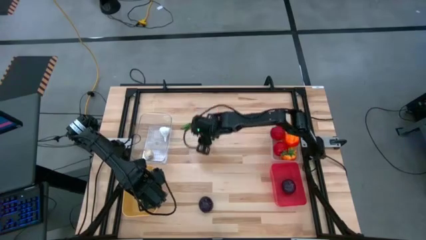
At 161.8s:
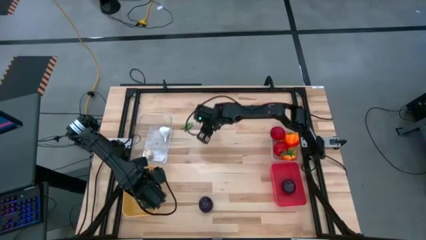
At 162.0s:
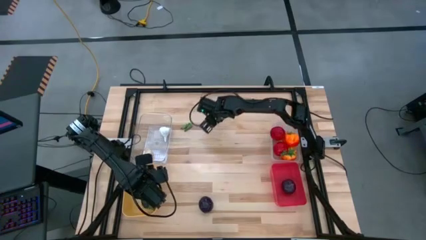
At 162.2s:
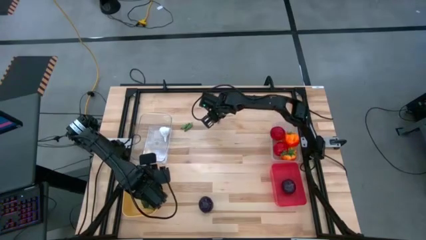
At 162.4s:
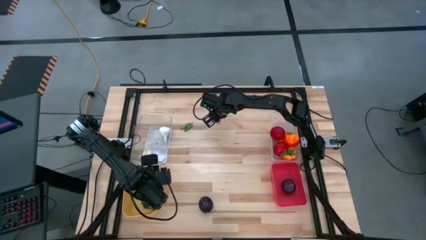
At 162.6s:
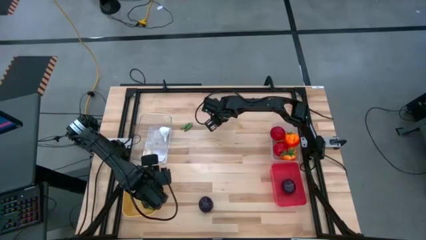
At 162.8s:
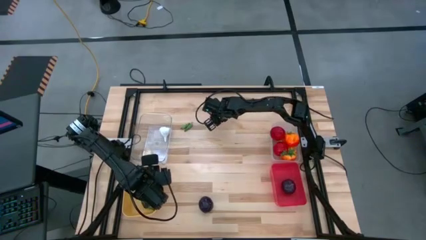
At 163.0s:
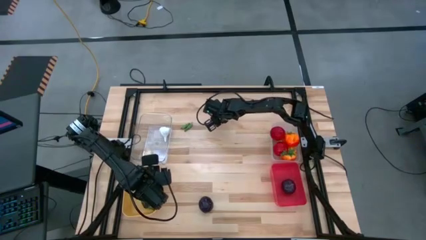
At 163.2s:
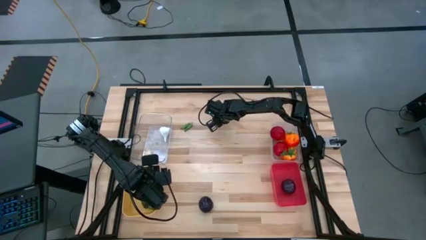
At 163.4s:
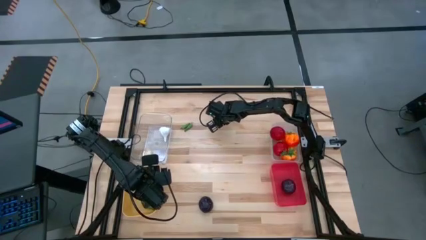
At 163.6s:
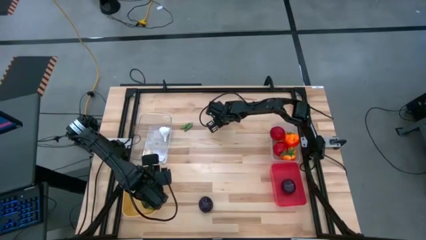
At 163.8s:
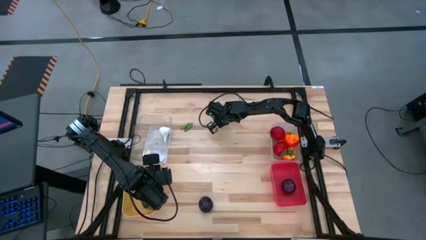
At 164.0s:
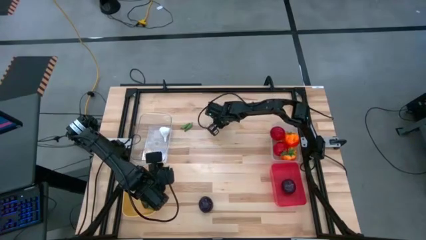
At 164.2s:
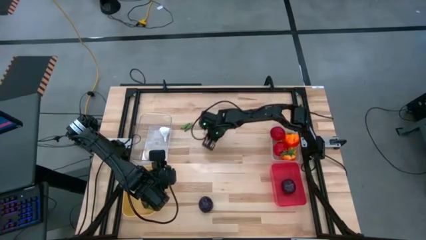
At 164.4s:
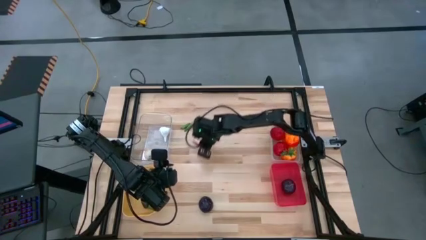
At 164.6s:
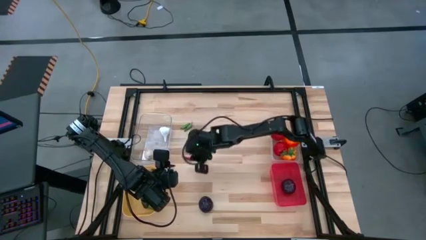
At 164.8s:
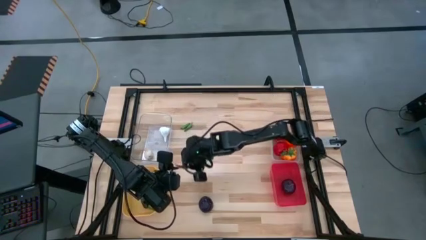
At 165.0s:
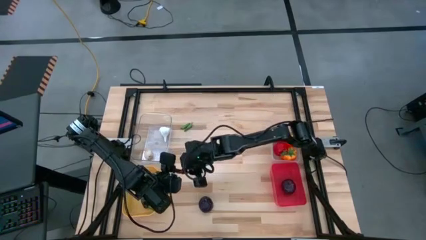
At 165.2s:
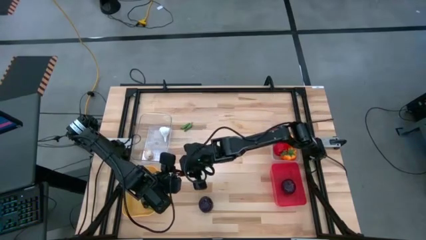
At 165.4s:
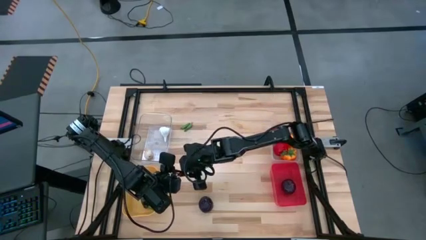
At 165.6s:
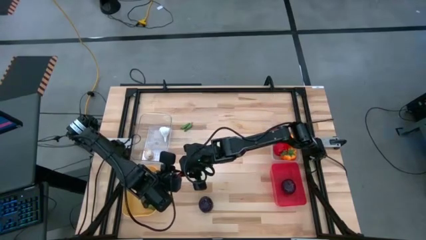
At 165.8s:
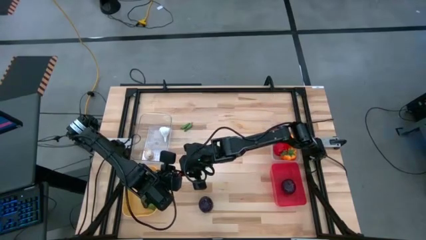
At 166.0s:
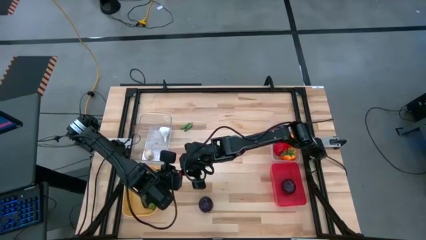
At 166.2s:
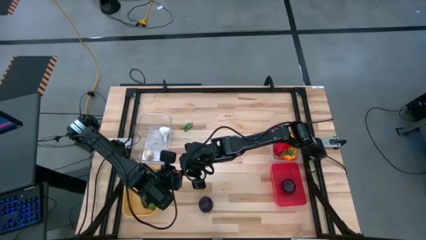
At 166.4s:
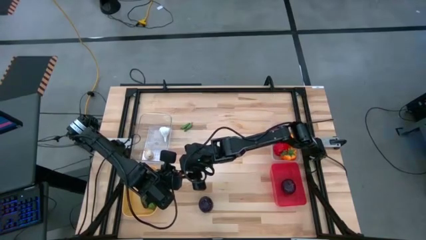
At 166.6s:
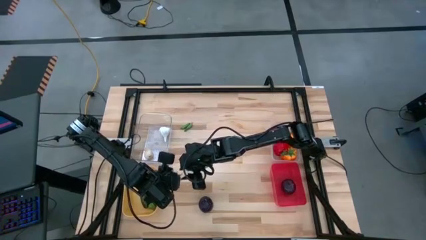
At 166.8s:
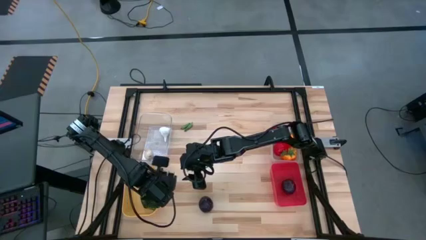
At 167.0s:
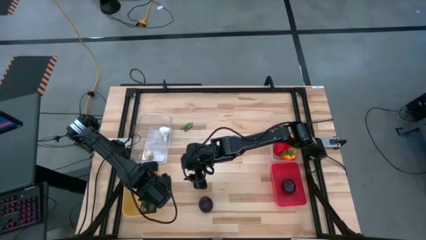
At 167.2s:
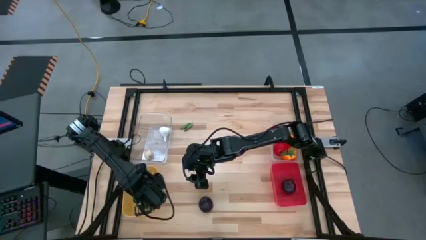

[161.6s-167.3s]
Task: Sort produce into baskets
Put the red chili pepper into the yellow bin

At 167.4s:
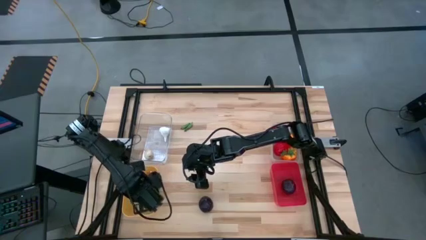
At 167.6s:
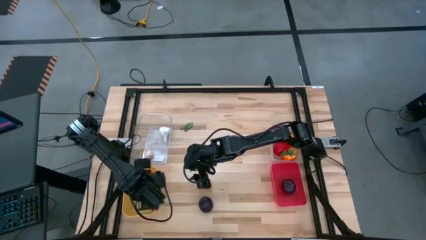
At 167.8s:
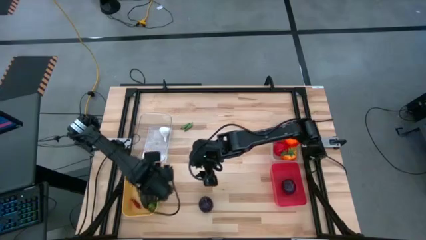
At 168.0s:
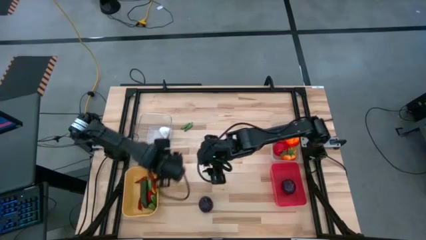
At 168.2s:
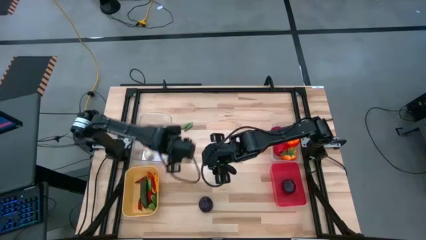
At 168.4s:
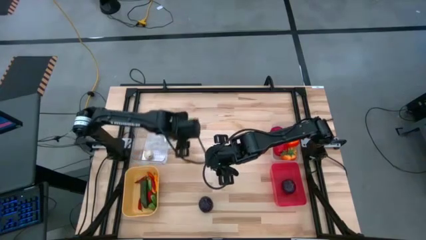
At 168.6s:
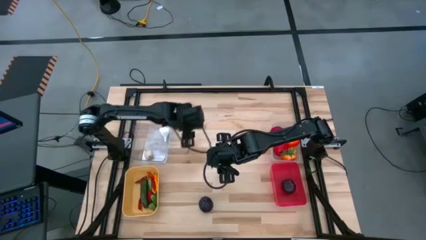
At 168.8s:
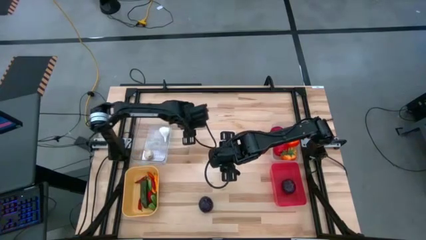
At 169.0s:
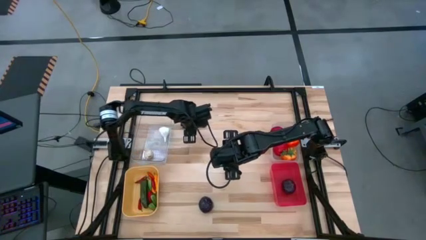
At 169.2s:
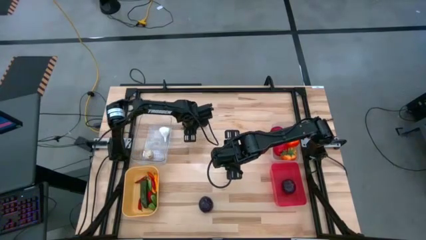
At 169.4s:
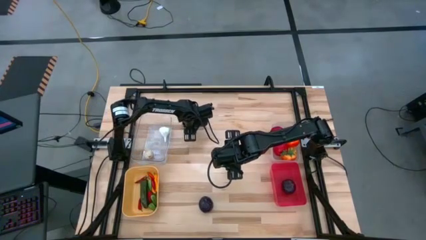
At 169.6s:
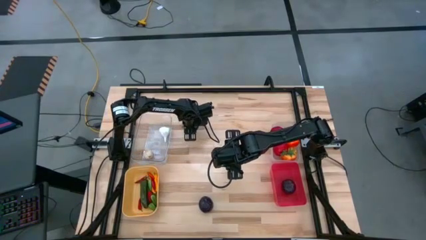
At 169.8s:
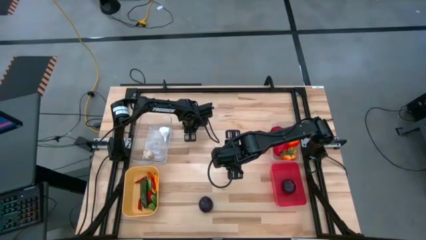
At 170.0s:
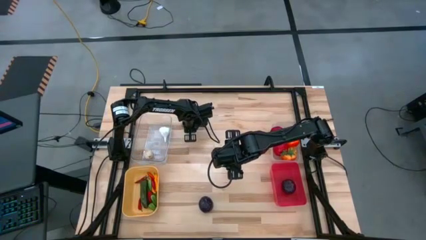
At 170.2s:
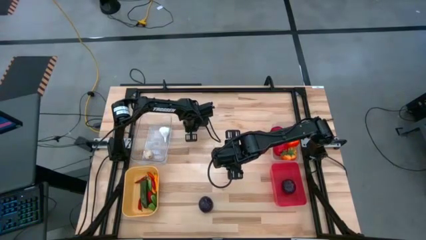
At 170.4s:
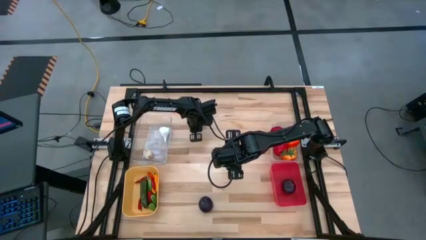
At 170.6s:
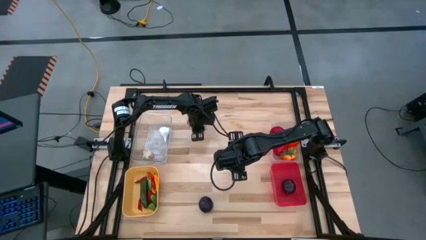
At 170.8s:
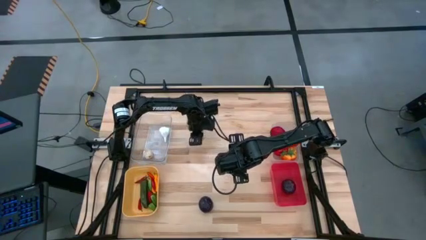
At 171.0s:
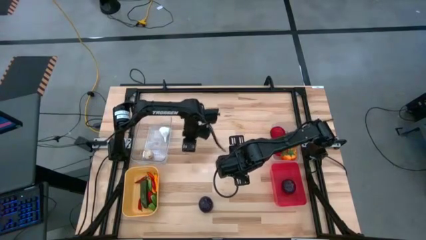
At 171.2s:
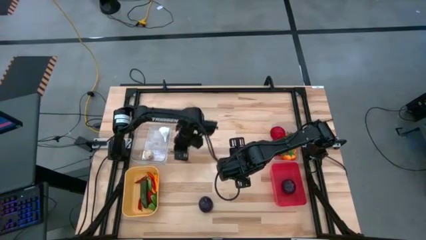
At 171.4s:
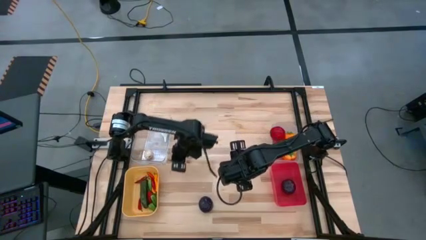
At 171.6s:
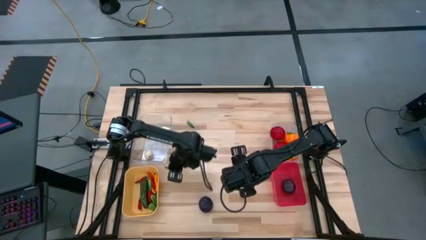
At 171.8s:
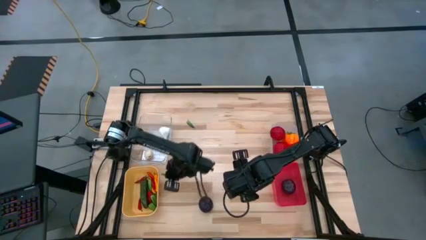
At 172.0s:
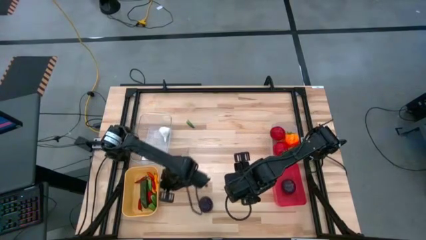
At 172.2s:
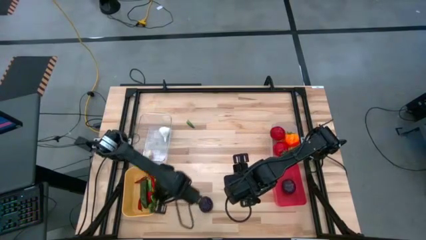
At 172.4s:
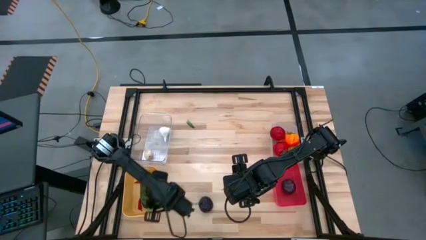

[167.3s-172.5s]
Put the green chili pepper into the yellow bin

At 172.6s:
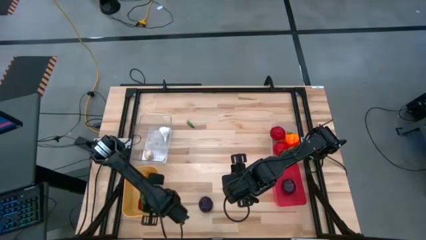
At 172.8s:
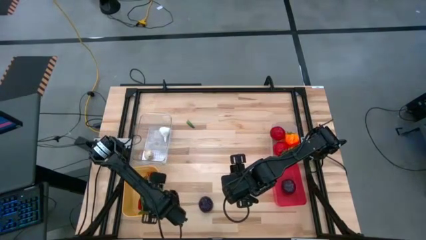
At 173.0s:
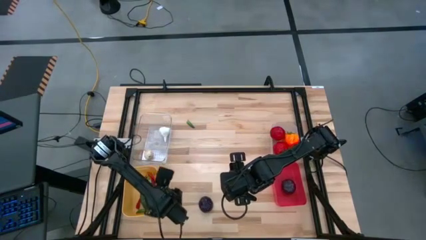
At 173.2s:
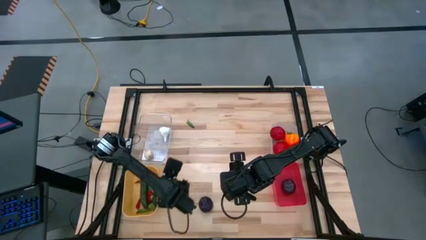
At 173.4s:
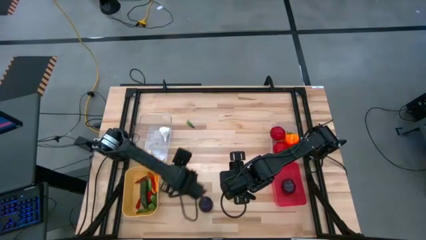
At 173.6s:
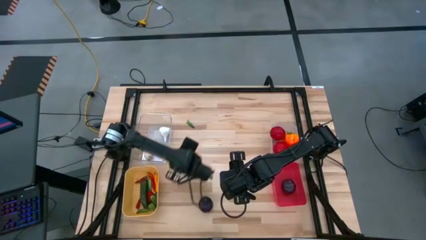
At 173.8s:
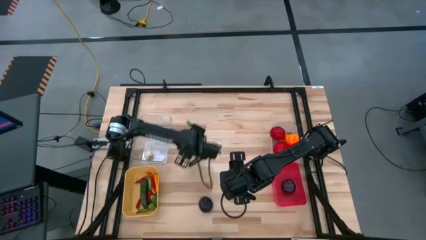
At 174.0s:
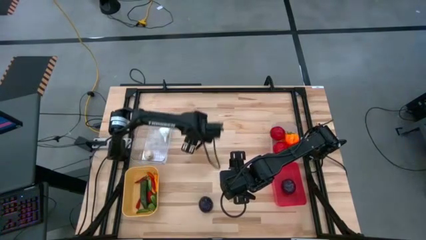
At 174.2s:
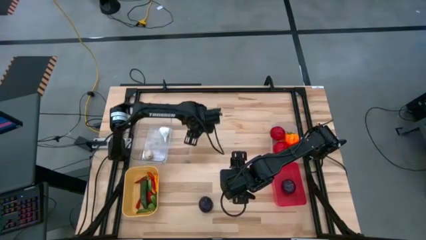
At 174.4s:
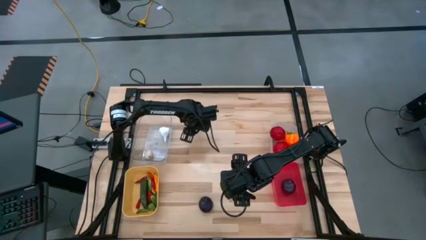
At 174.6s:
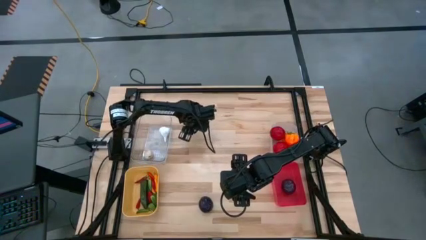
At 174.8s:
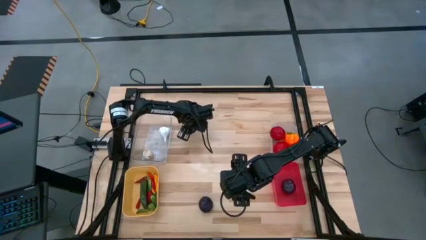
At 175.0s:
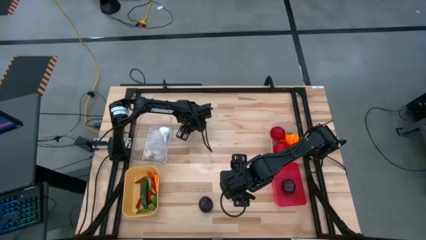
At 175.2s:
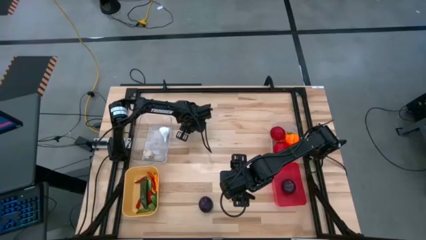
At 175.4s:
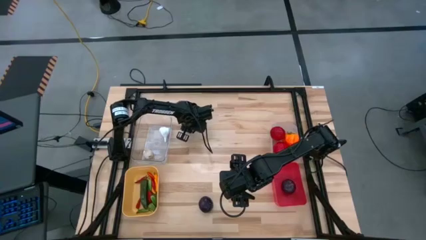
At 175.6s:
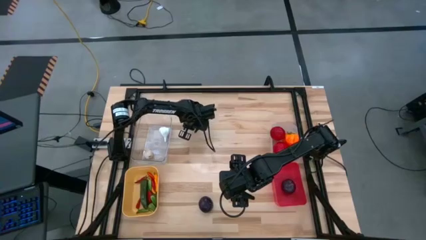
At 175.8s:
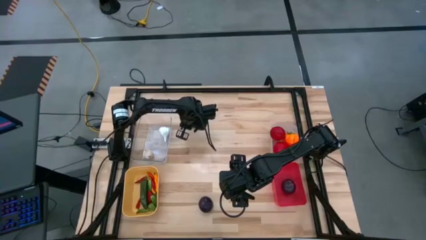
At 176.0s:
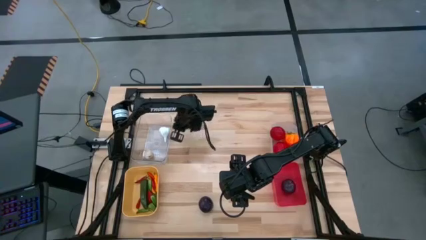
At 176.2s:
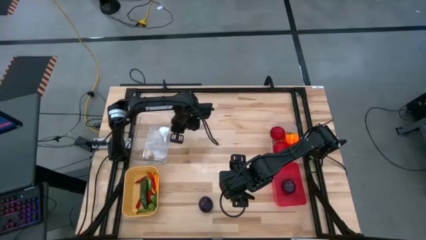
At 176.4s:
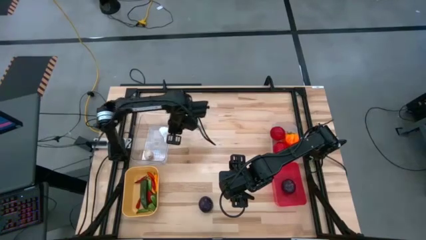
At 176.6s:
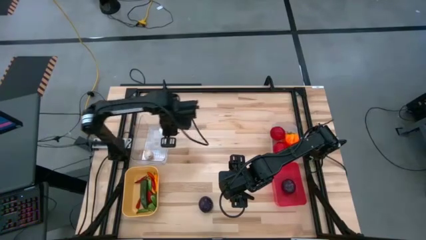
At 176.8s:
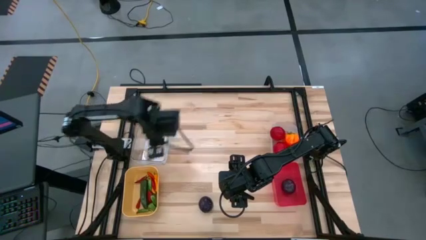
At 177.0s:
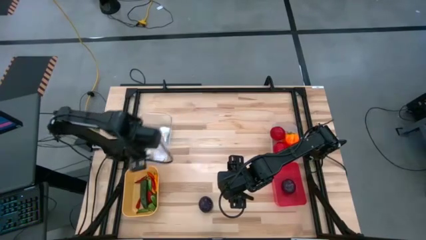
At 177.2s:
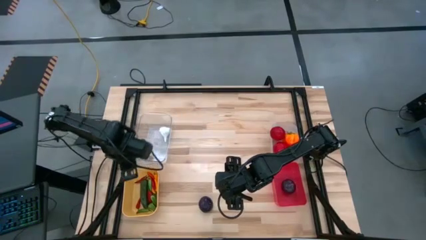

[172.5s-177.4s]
Put the green chili pepper into the yellow bin

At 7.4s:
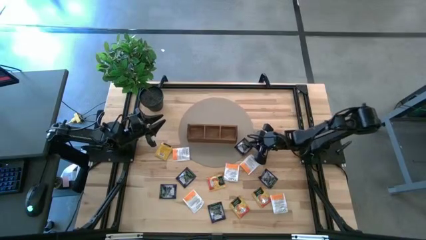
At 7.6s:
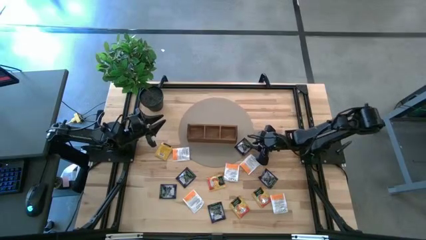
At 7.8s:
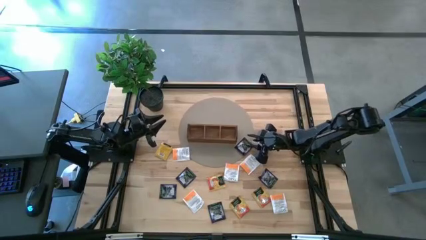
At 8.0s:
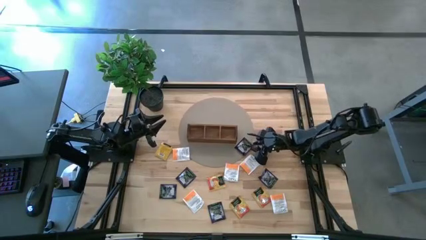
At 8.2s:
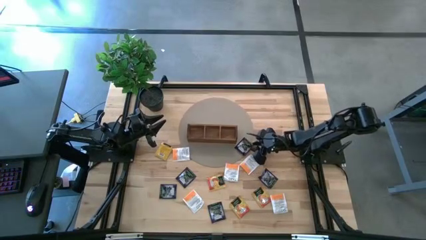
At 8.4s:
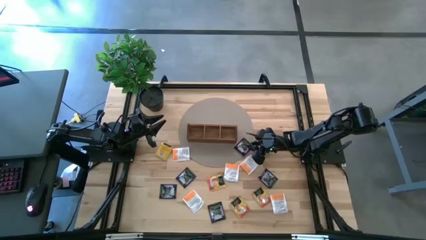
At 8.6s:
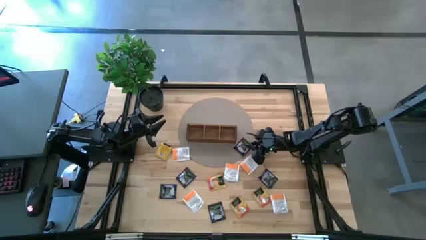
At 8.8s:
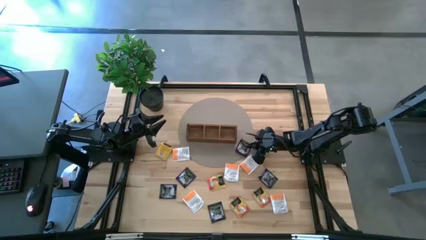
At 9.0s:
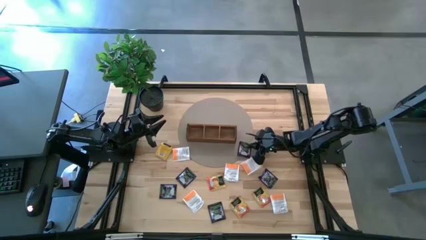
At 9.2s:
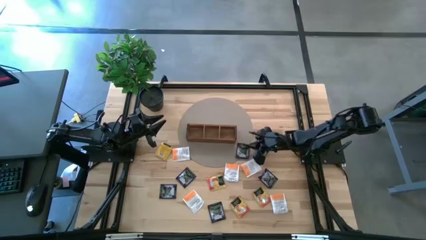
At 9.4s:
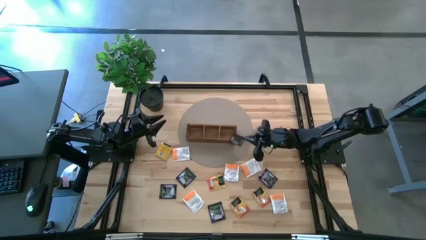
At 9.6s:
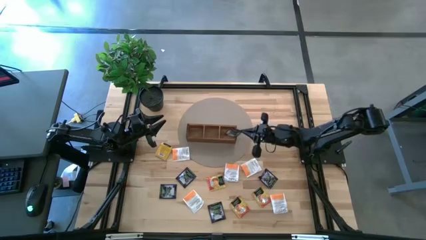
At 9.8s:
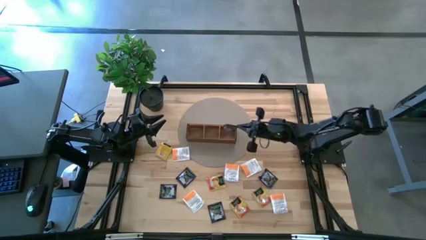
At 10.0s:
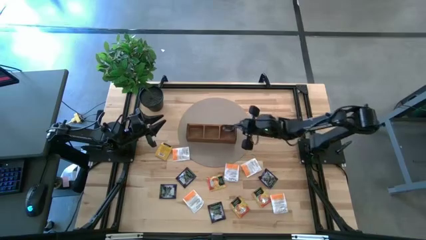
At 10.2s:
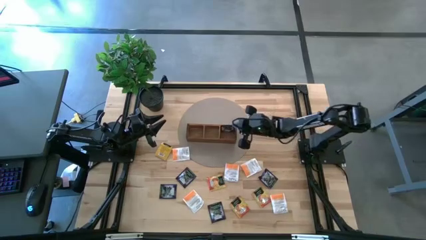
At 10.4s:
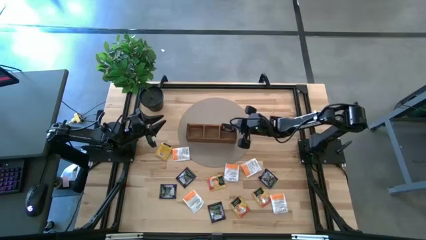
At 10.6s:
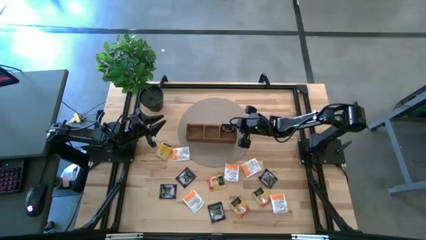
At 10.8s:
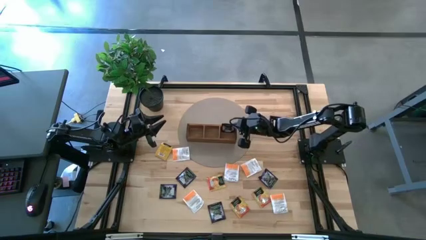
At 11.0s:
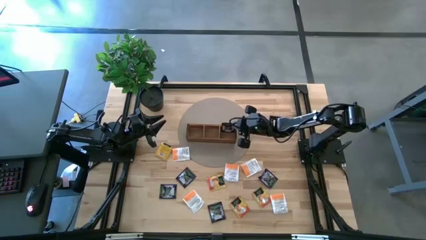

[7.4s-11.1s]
Task: Pick & Place Tea
Put the purple tea bag into the right section of the wooden organizer
